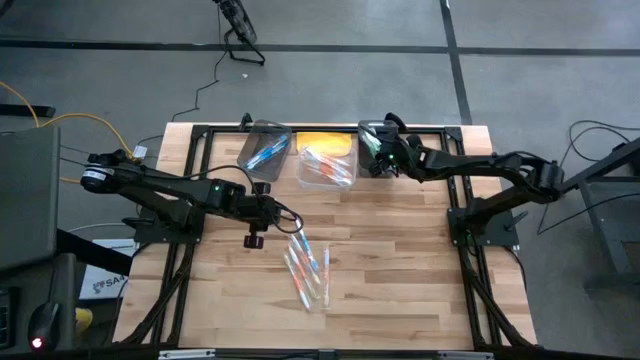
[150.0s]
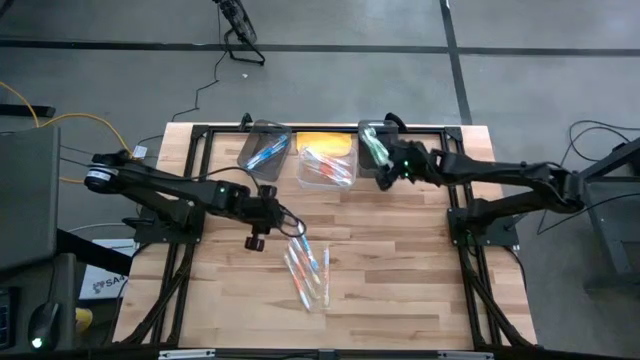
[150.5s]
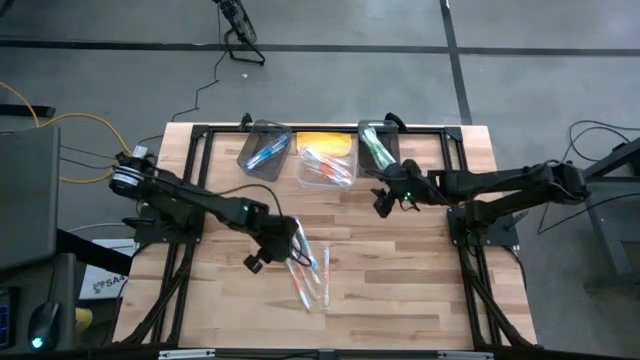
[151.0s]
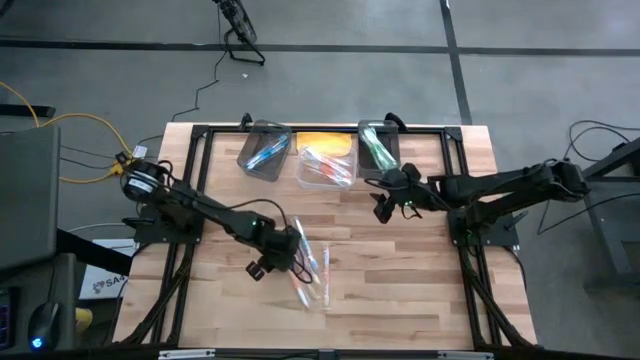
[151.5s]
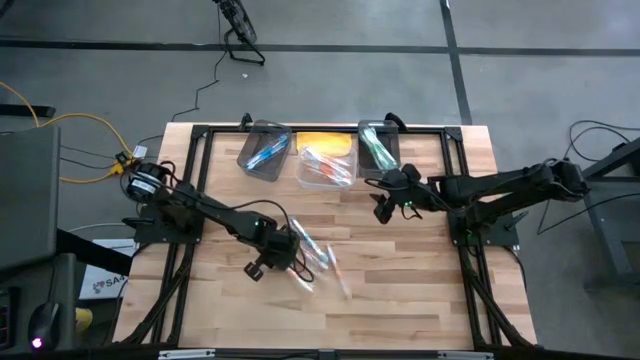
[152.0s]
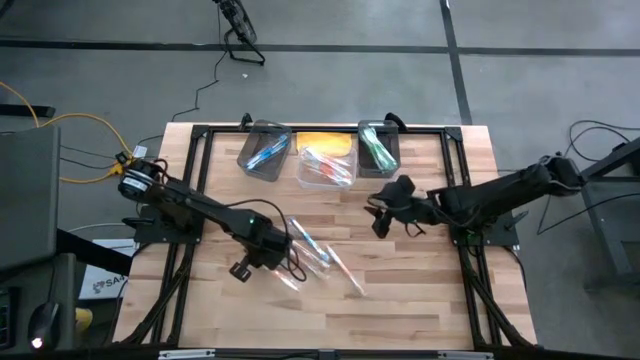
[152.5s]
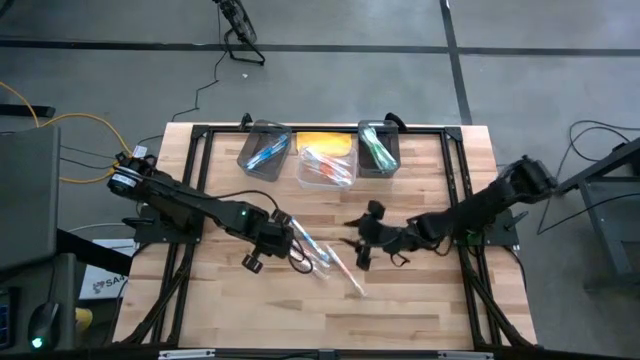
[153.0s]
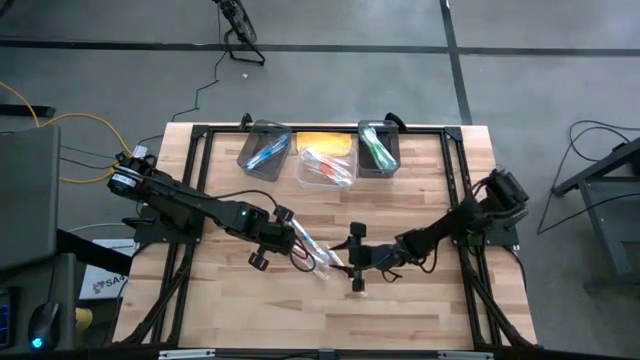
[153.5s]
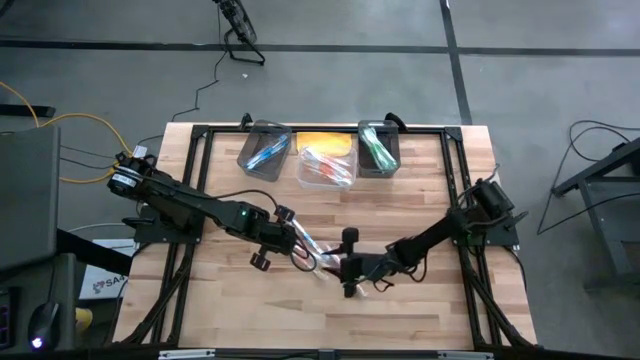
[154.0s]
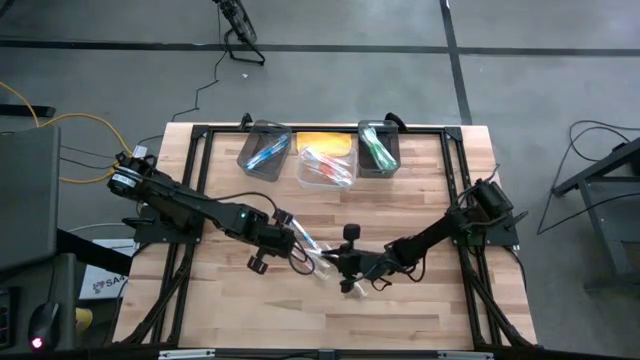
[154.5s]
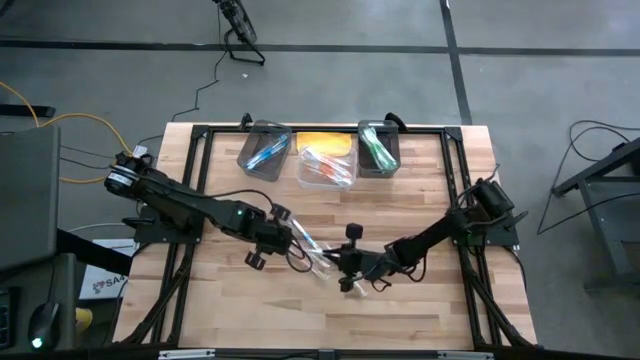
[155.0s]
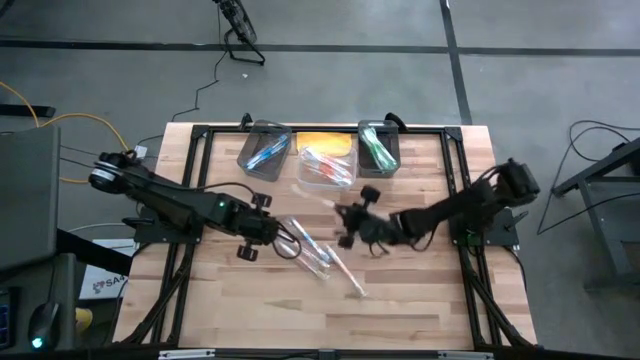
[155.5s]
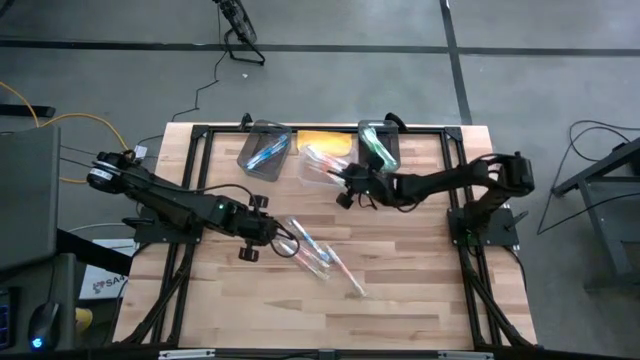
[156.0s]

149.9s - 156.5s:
Task: Pick & Place Toothbrushes
Put the orange toothbrush into the transparent bin

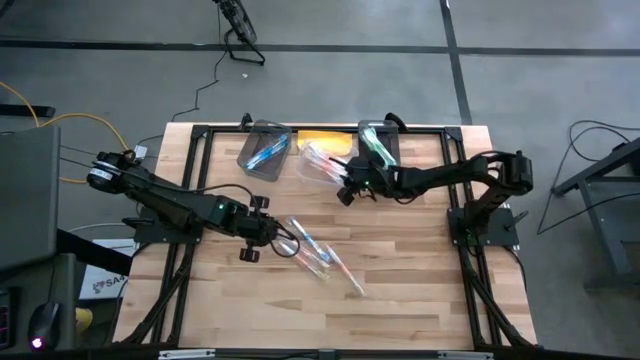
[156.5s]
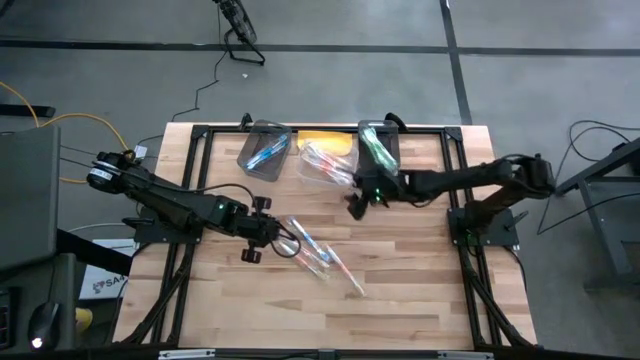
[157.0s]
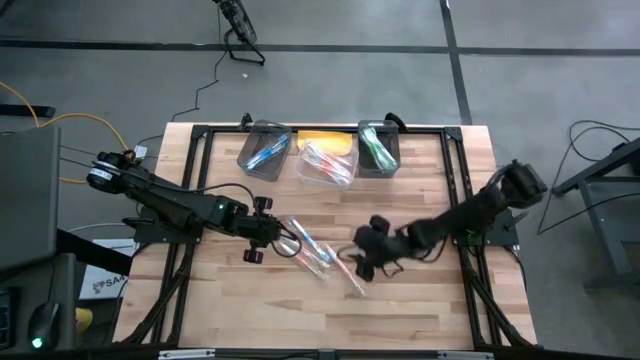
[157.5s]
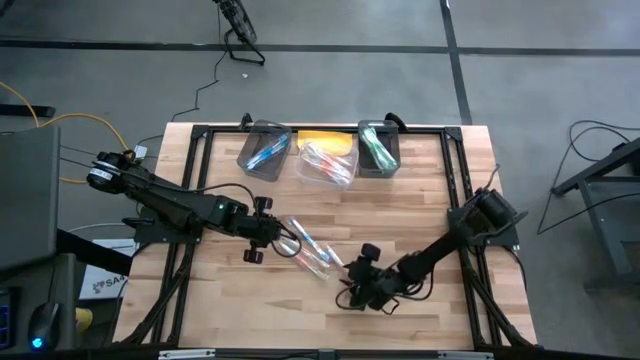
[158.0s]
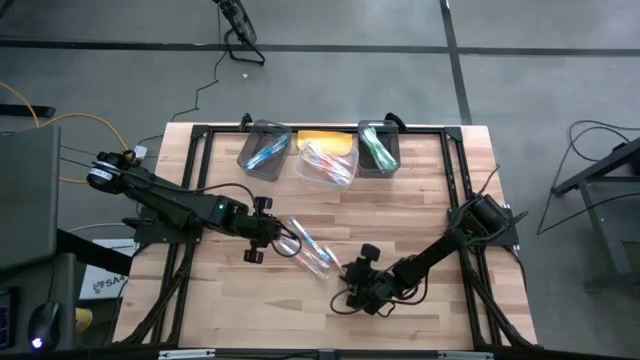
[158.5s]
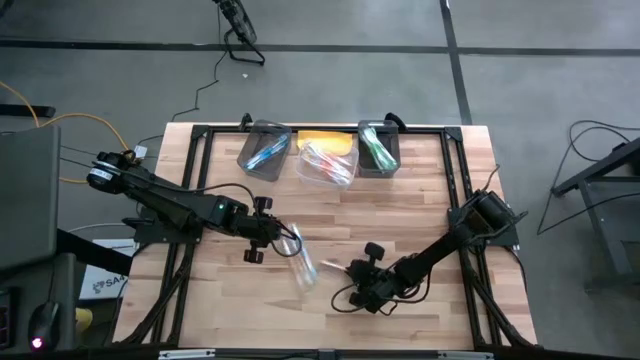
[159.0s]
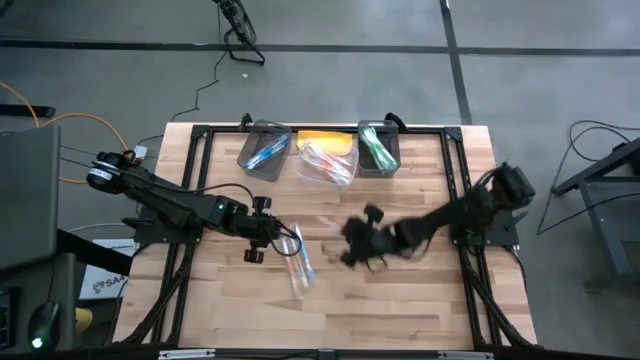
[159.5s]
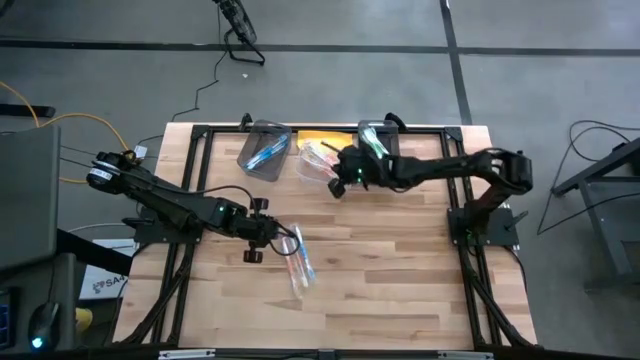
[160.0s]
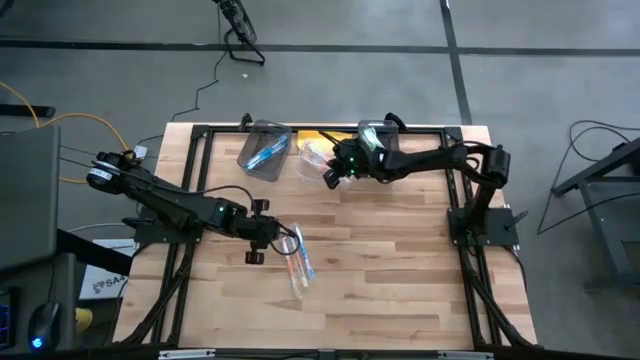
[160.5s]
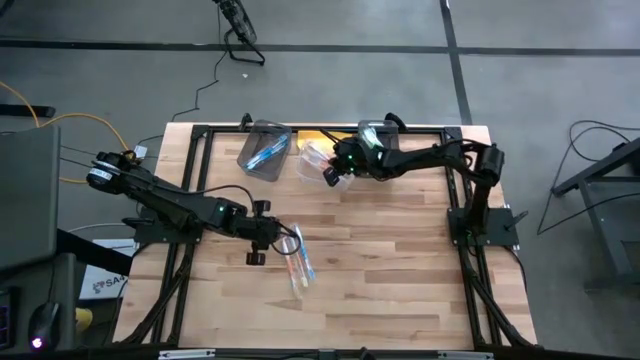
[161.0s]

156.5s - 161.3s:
Put the orange toothbrush into the transparent bin

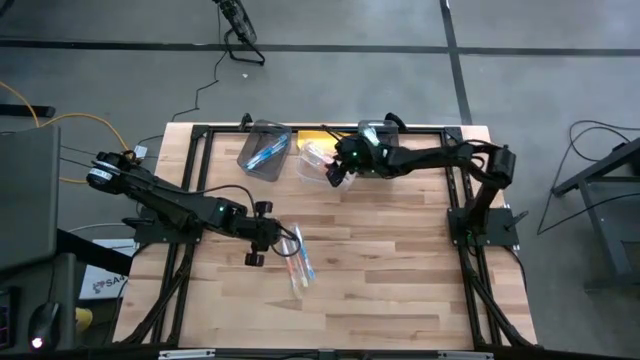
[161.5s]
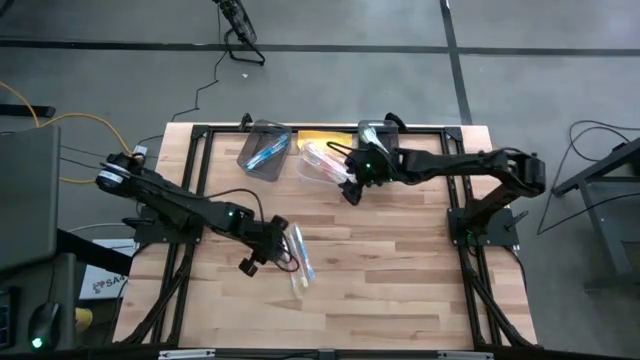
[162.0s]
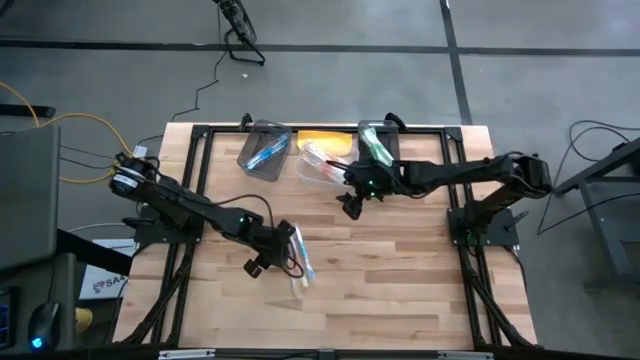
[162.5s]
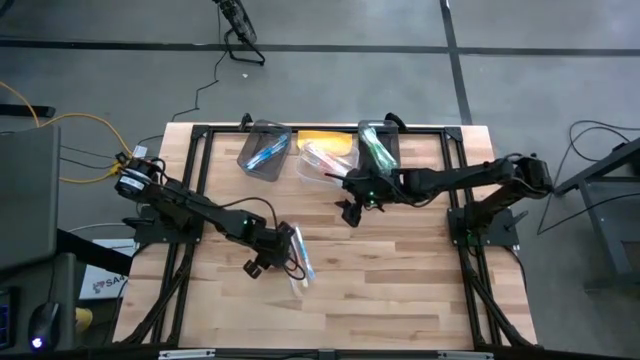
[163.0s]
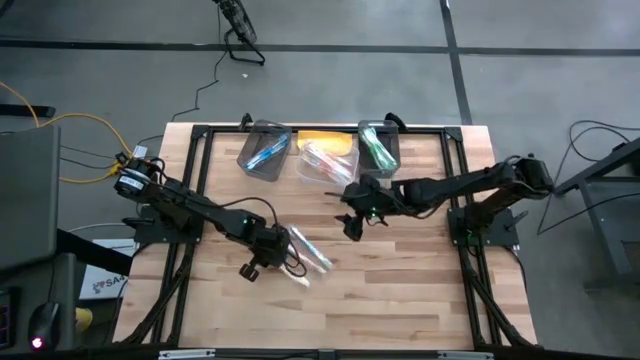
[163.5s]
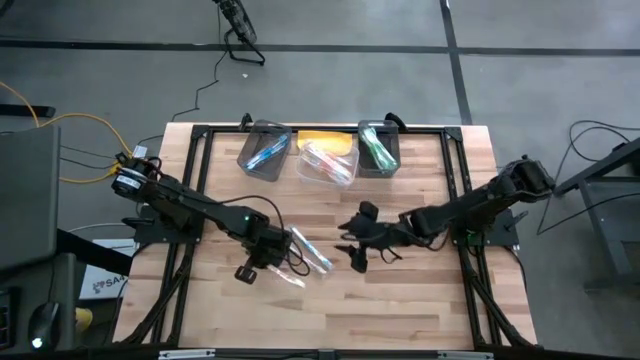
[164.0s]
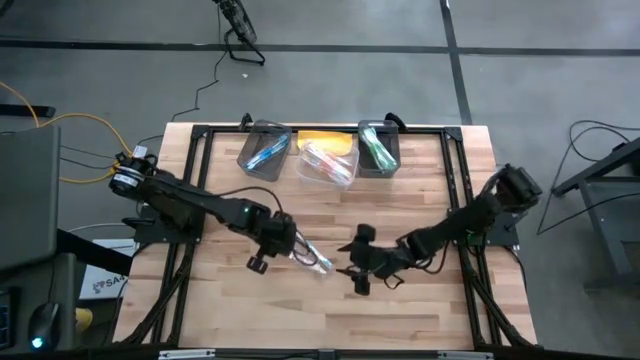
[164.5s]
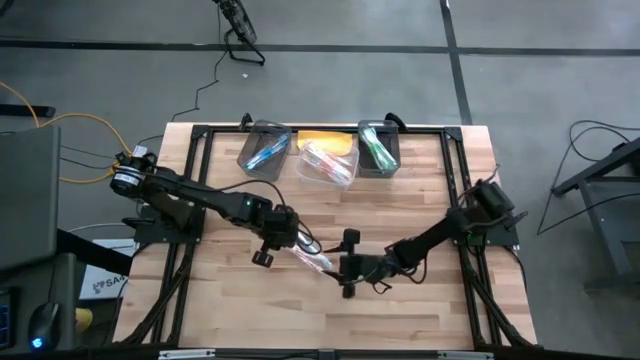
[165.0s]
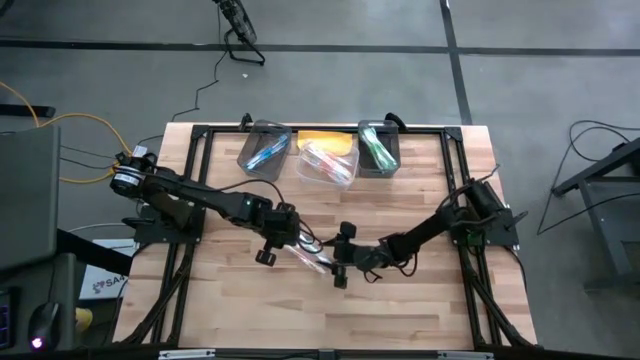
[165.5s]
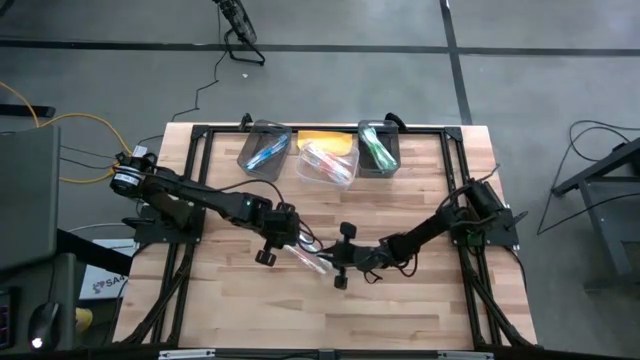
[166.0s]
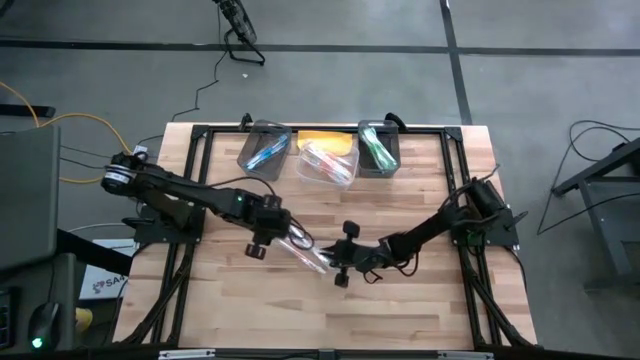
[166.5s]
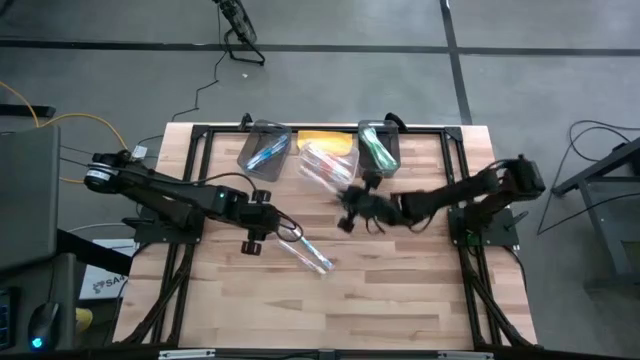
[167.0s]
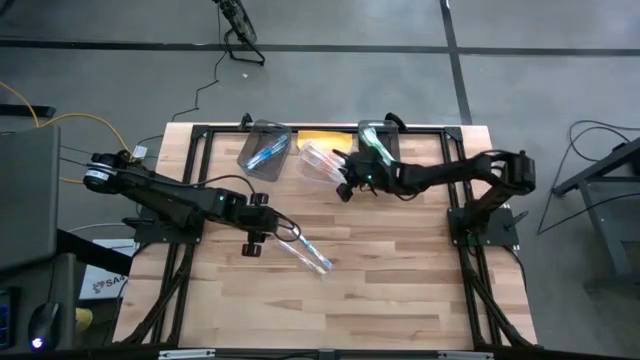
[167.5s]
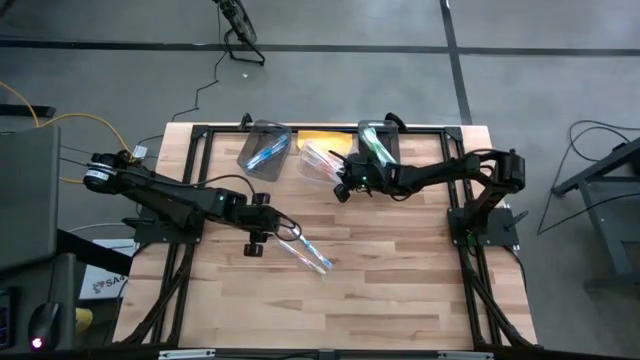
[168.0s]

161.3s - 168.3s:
Put the orange toothbrush into the transparent bin

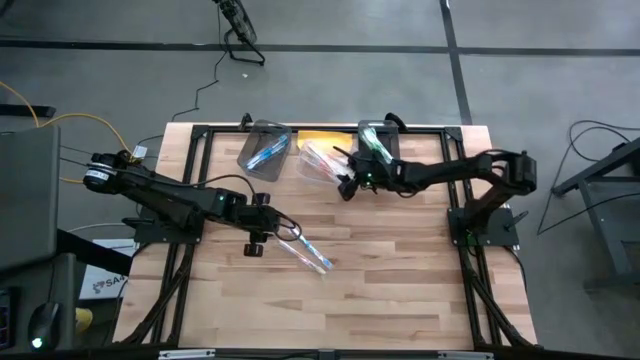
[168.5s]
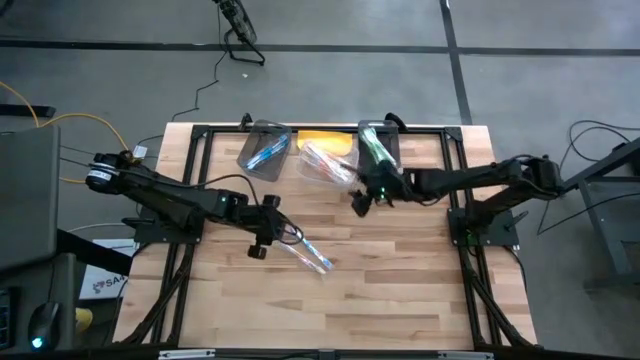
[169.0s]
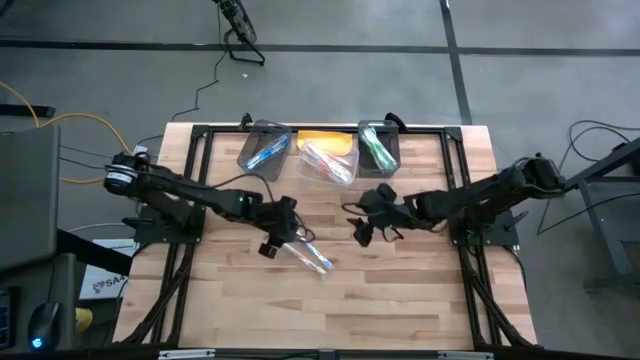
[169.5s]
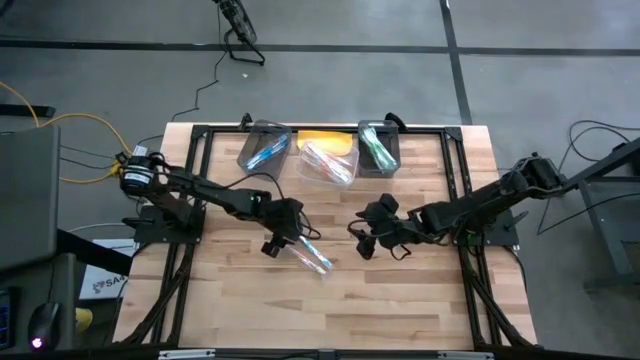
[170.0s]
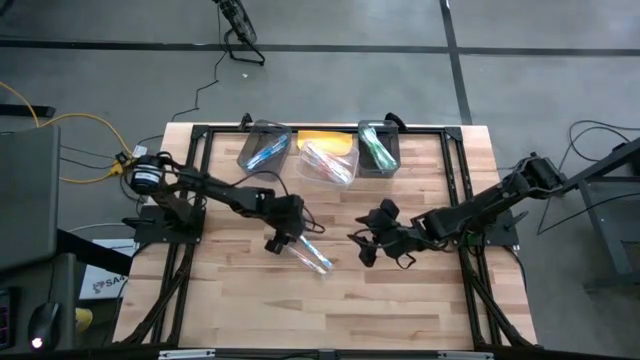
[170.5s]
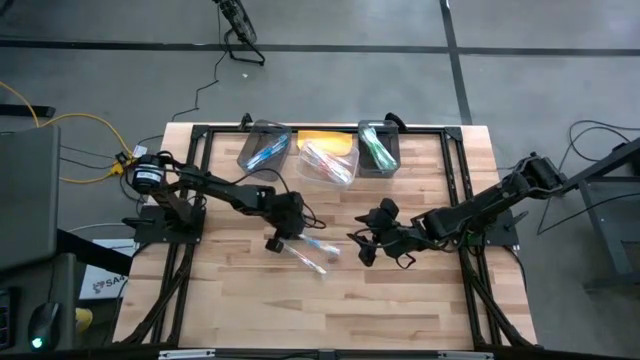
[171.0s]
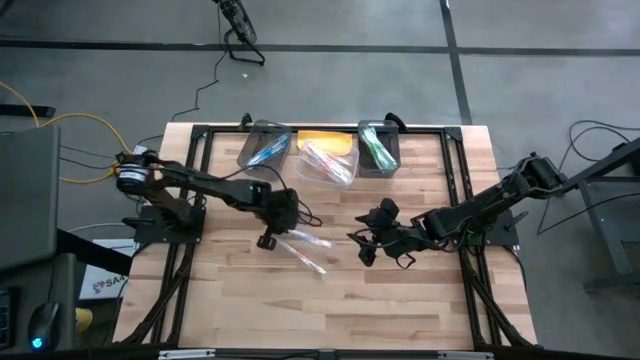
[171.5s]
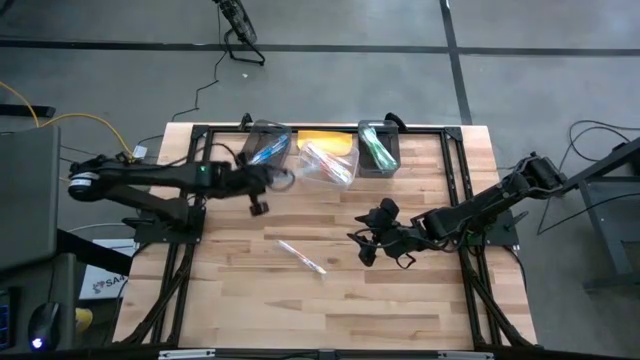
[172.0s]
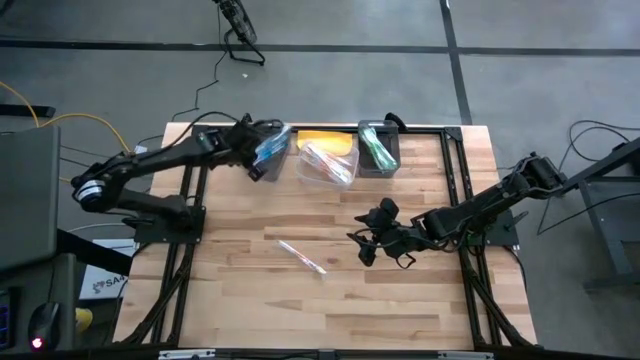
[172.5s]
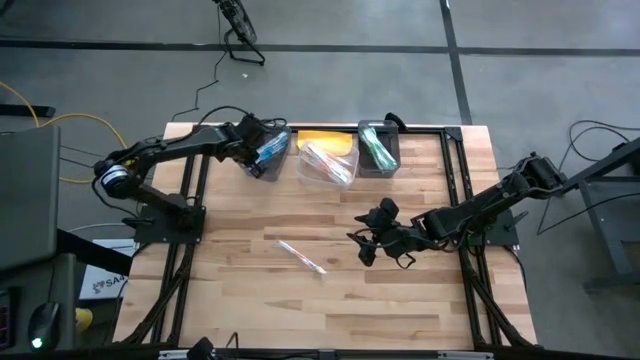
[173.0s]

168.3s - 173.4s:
Put the blue toothbrush into the left black bin
